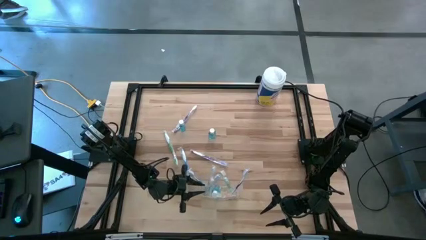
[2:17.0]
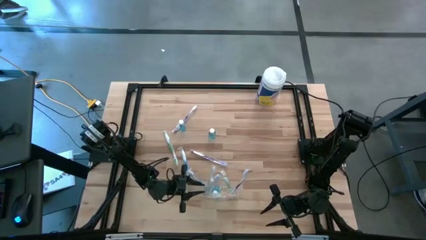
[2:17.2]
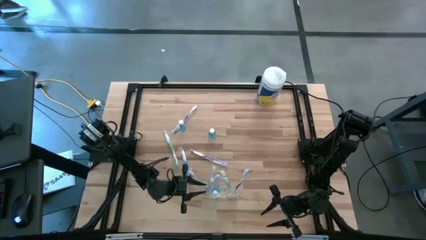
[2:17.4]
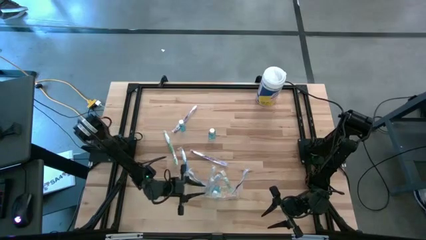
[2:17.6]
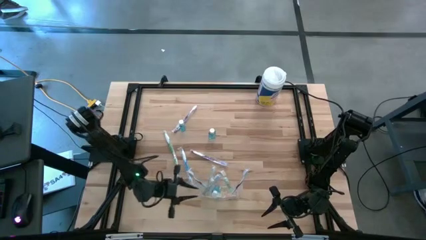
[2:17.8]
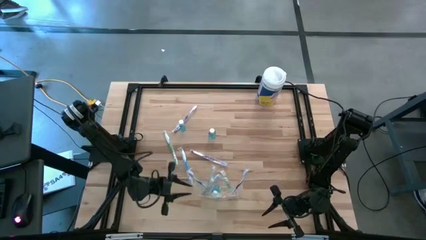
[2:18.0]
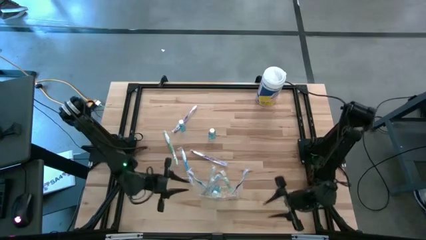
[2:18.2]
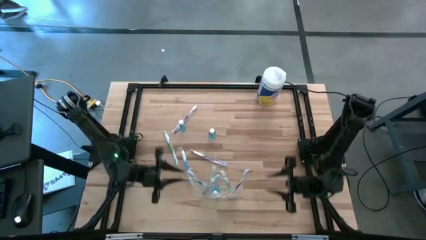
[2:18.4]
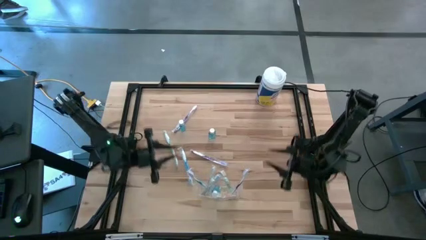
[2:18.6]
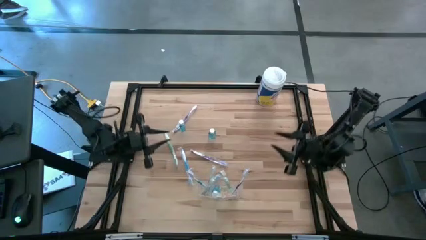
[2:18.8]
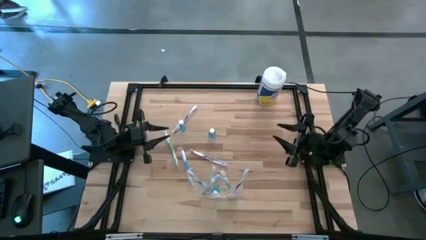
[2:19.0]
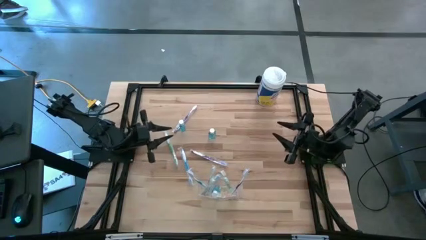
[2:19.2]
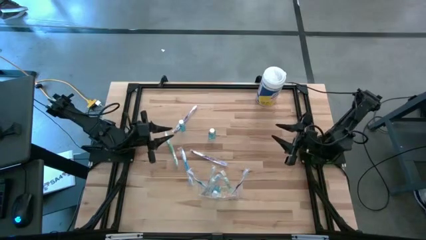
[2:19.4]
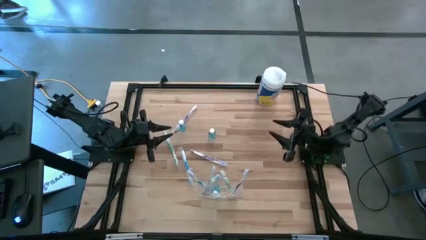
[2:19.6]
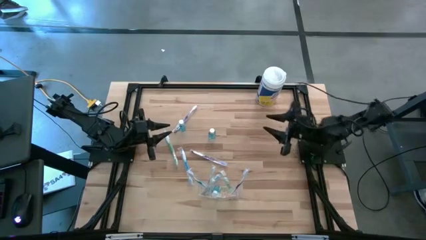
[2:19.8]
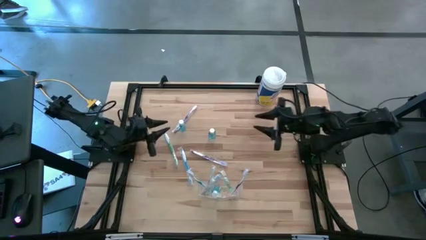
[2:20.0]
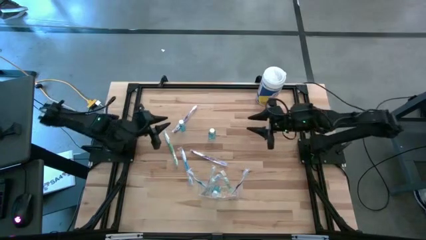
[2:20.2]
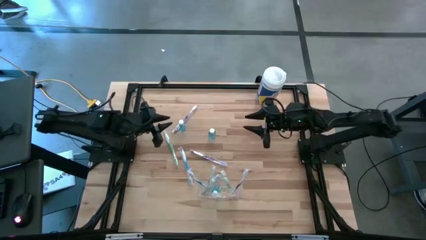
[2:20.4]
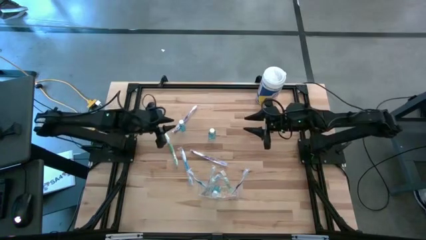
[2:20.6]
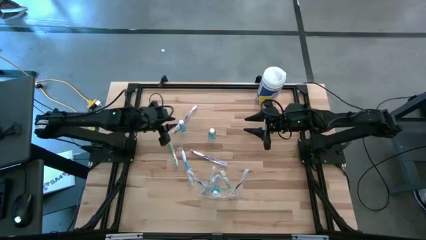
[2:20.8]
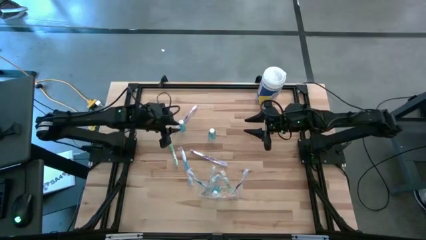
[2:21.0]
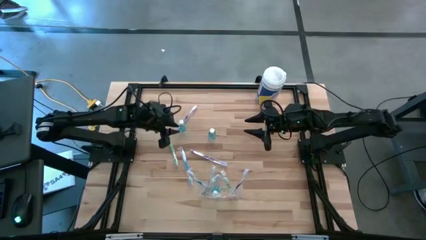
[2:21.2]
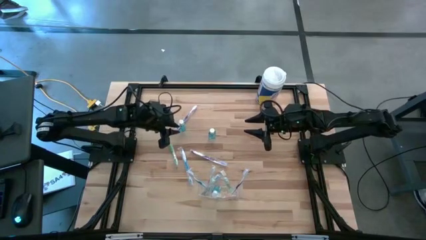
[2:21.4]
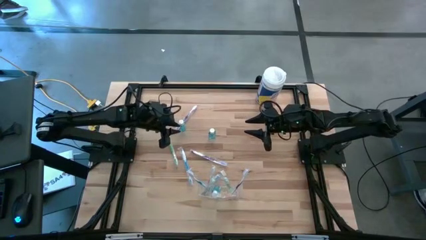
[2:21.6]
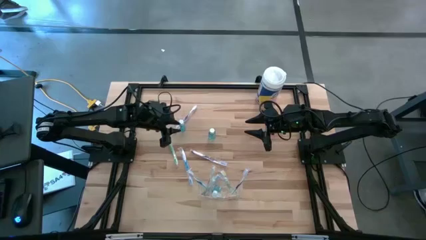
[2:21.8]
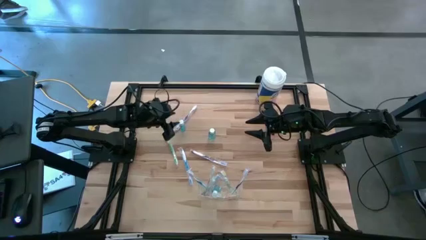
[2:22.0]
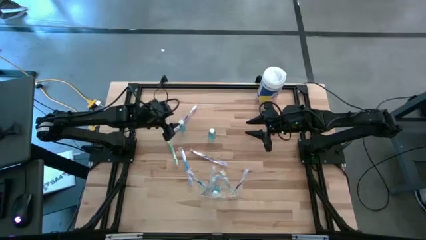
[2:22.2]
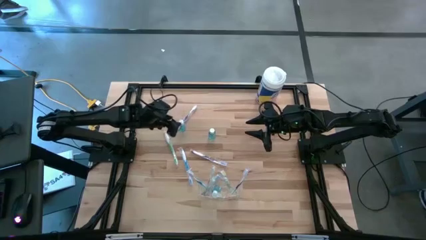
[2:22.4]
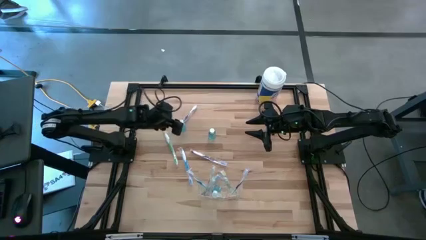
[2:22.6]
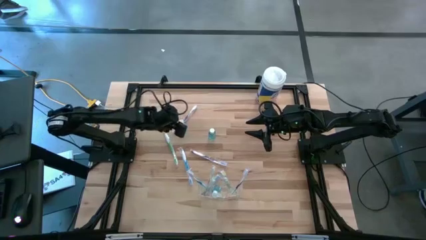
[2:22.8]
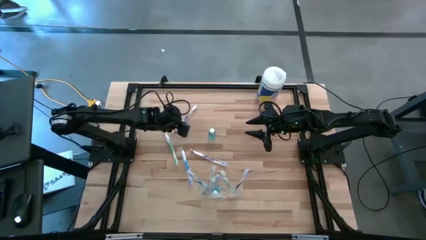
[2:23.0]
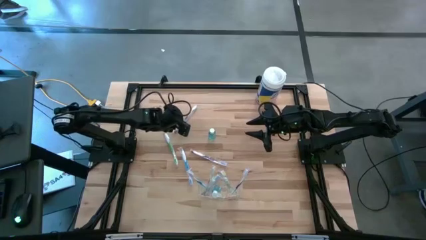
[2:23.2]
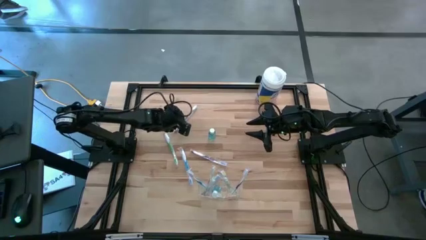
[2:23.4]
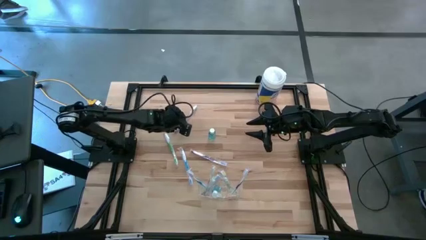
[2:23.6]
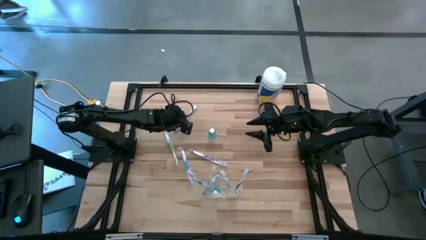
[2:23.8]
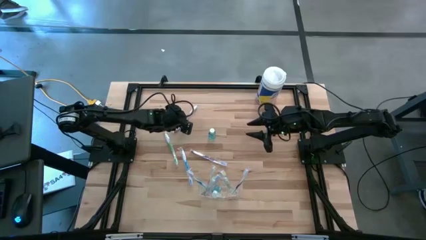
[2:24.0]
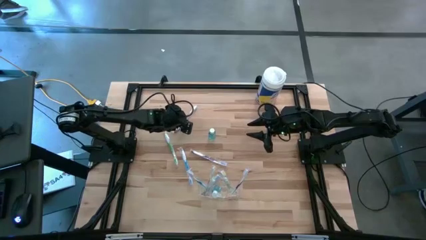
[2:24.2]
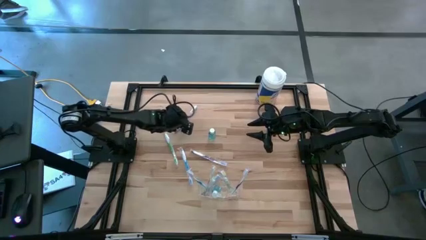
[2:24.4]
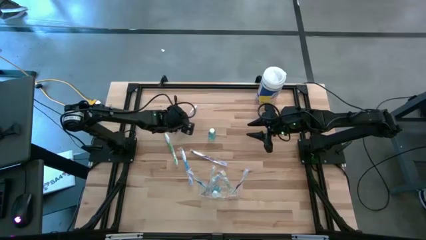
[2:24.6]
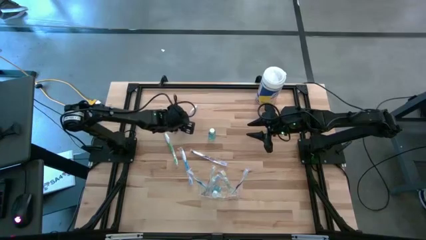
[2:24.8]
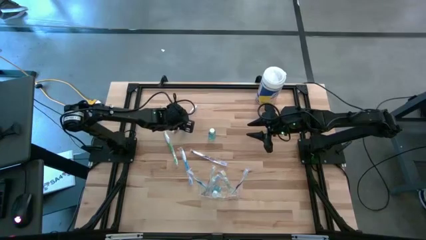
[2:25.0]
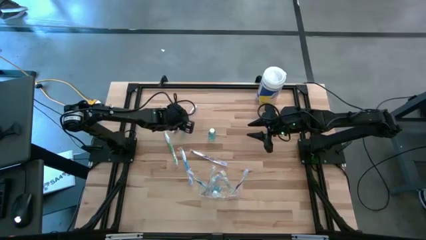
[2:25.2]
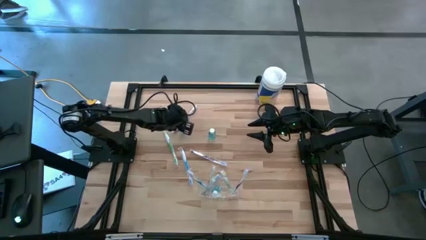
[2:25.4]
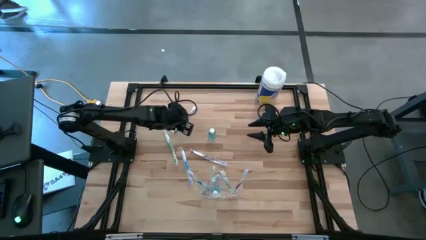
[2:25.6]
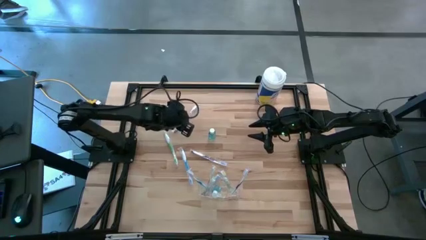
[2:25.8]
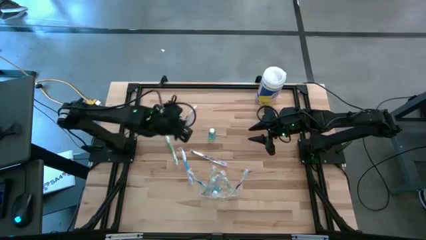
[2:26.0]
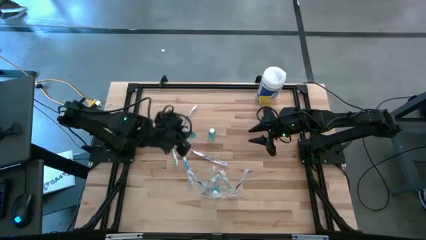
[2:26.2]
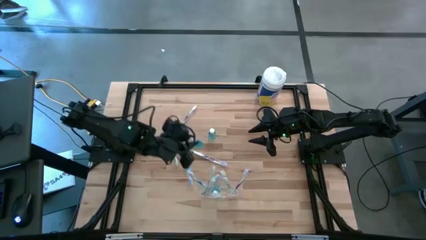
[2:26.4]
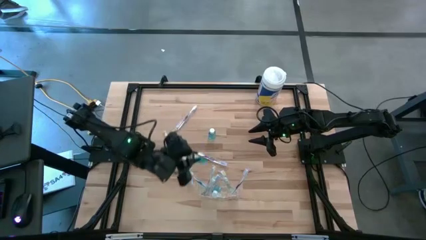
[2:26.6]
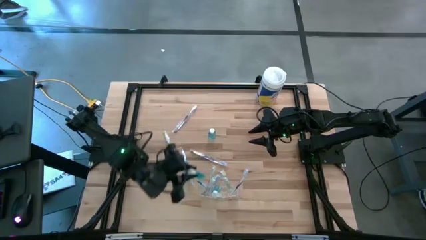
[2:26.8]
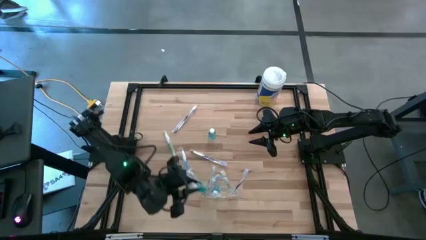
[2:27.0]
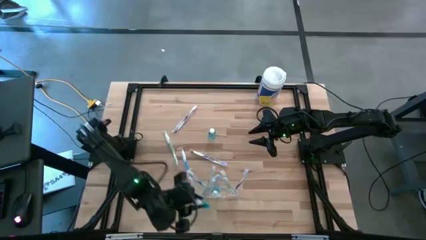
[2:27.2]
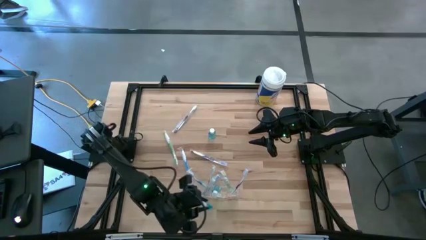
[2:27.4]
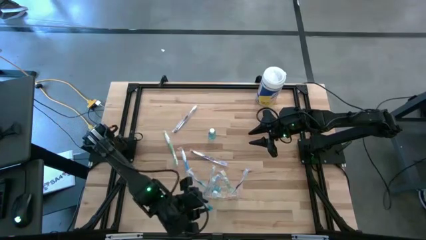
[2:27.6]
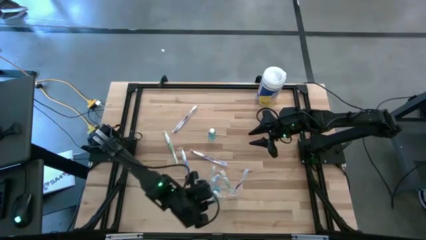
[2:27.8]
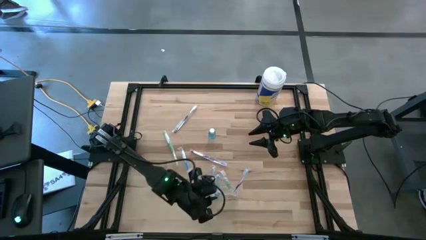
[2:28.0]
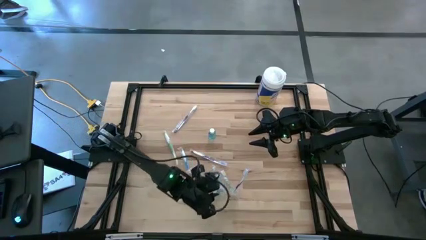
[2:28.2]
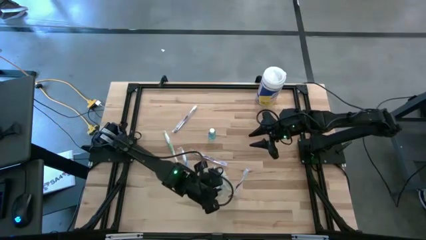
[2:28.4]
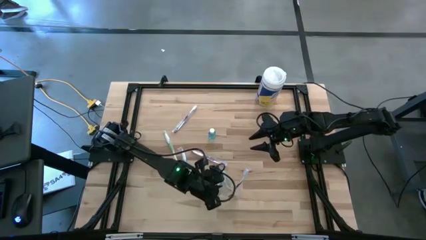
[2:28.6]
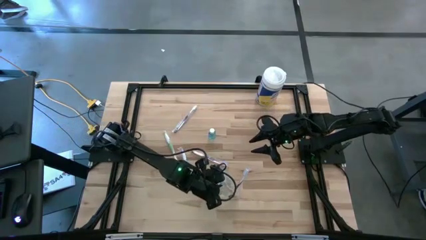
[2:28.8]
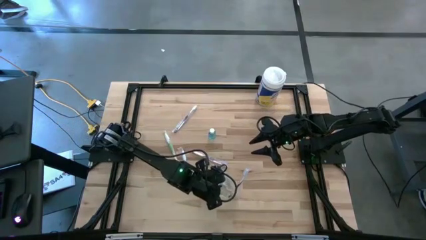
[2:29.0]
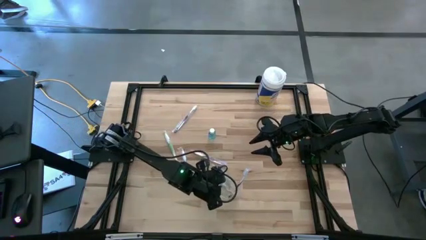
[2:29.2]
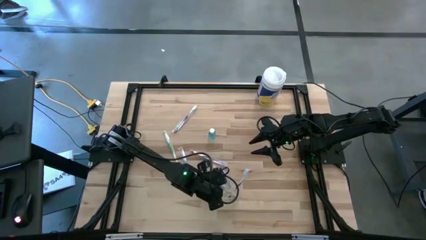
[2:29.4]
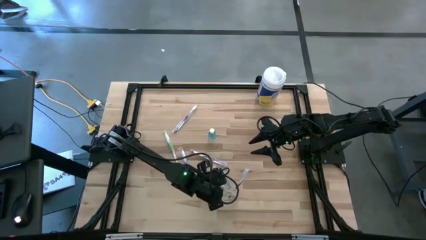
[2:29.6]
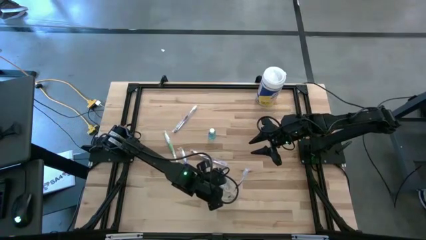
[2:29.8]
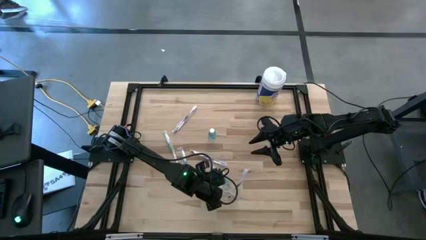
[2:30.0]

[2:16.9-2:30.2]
Task: Pick & Place toothbrushing station
Put the mouthwash into the transparent organizer

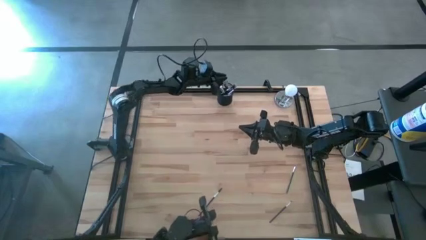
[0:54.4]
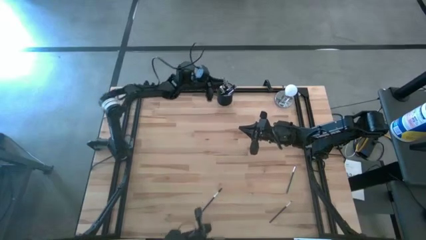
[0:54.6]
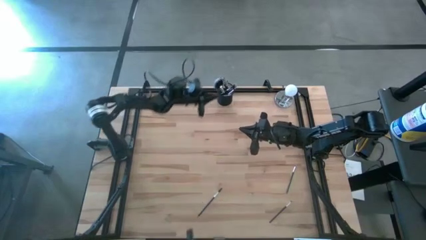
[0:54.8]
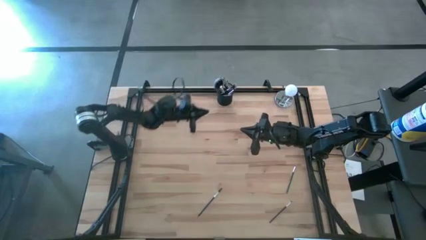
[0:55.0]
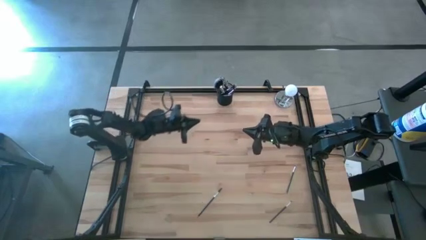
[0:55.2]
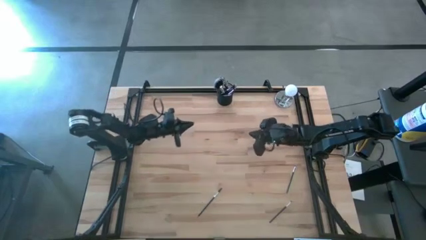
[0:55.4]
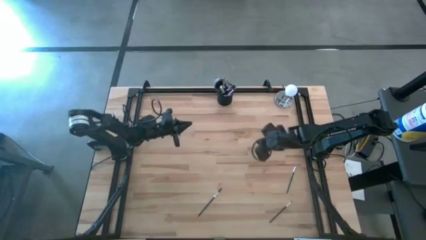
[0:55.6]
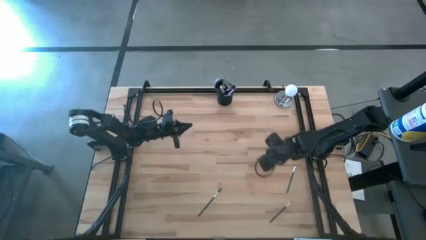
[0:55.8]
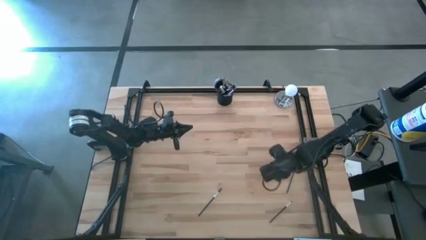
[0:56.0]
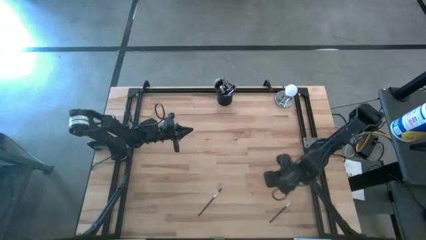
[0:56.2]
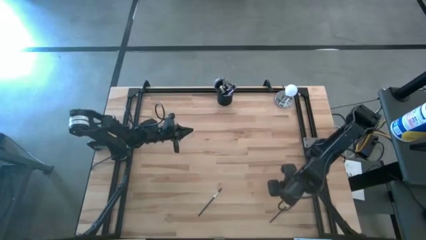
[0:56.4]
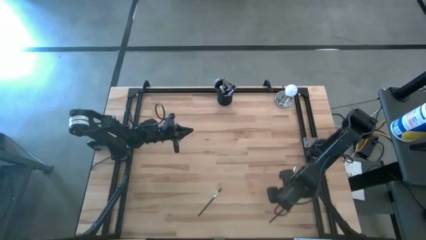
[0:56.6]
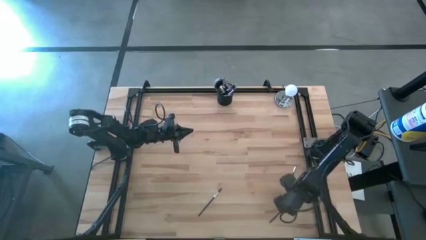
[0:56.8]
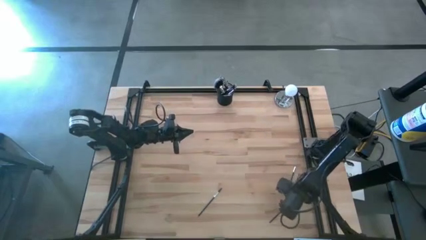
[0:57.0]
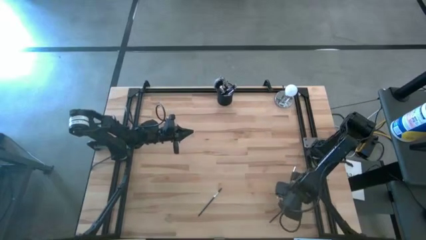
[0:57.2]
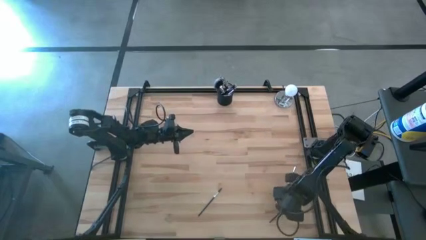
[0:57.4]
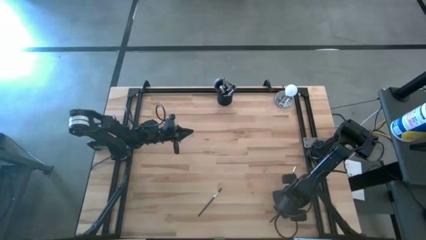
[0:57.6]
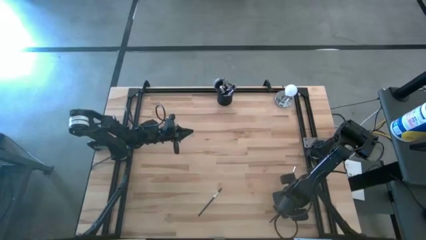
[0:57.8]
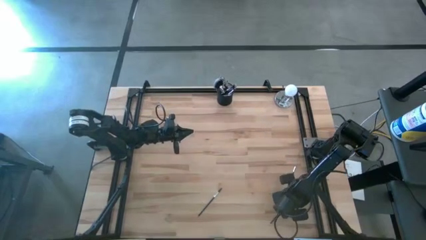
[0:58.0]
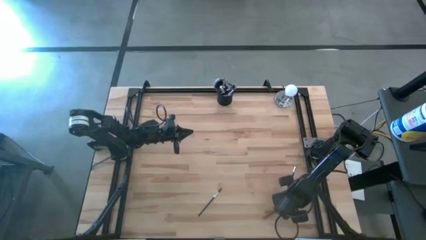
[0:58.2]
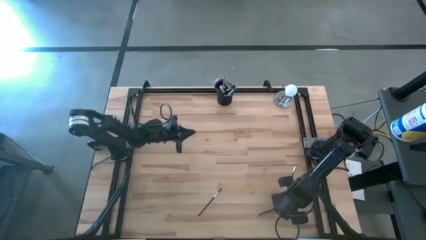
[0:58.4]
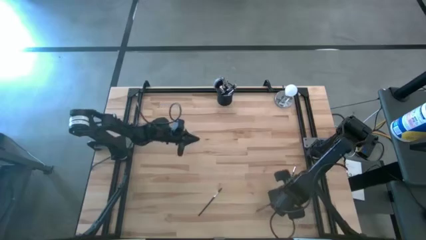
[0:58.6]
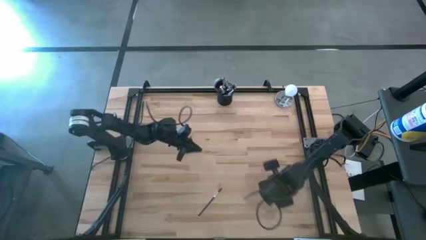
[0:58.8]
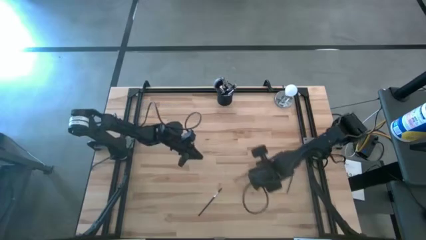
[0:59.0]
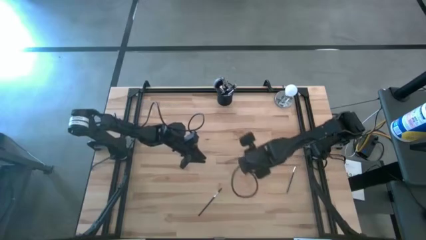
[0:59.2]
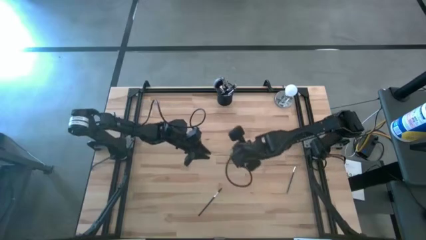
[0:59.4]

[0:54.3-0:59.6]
Task: Put items in baskets/containers
Put the black eyeshadow brush into the black pen holder
